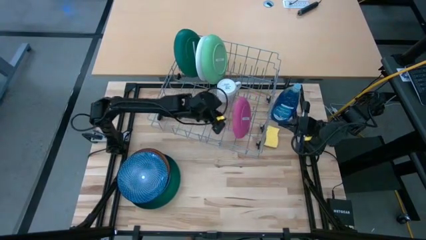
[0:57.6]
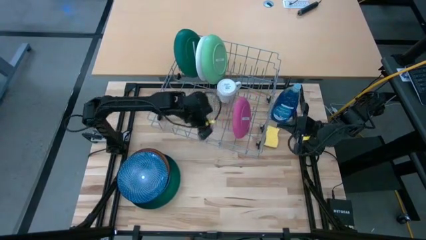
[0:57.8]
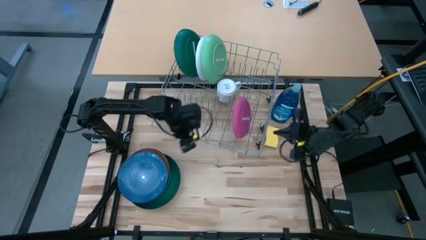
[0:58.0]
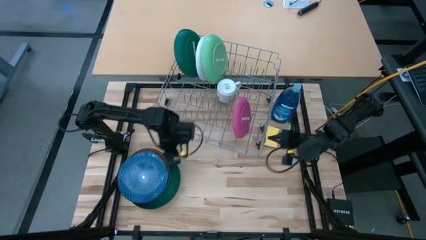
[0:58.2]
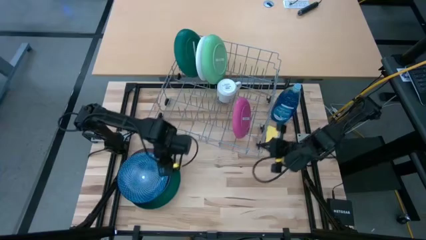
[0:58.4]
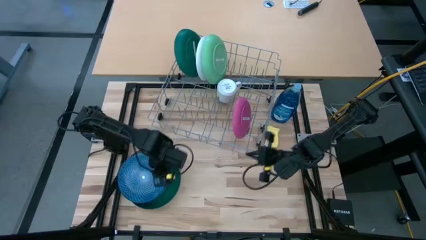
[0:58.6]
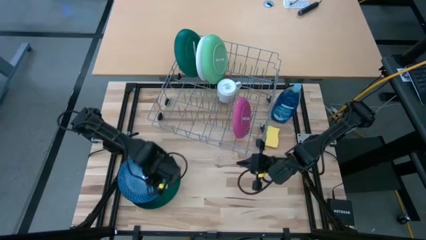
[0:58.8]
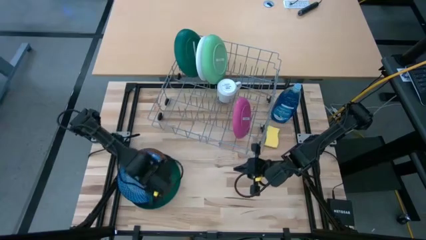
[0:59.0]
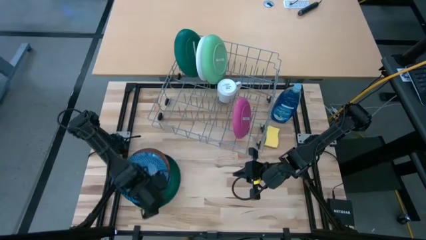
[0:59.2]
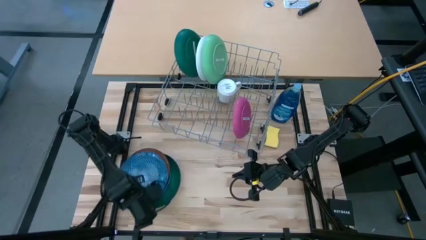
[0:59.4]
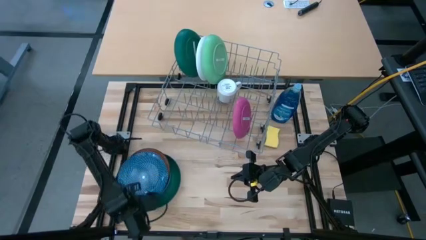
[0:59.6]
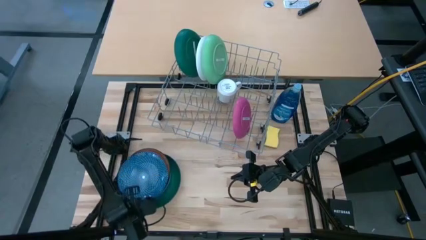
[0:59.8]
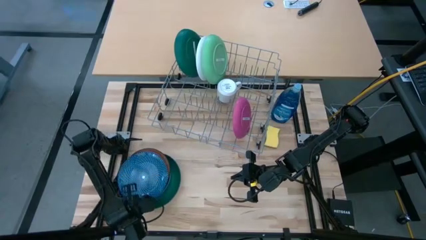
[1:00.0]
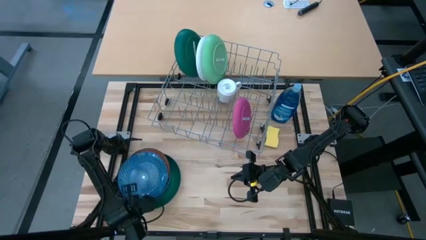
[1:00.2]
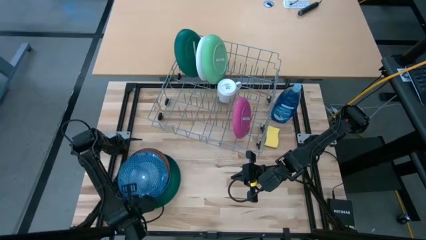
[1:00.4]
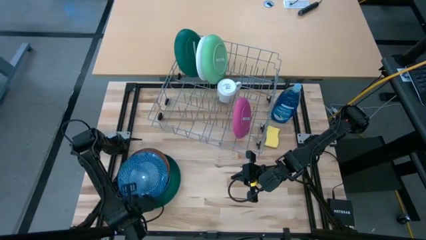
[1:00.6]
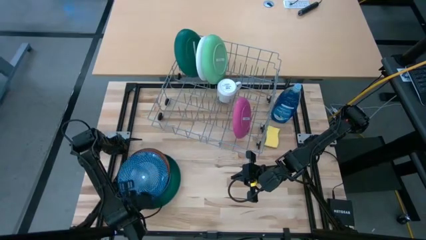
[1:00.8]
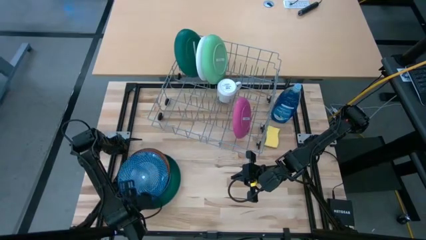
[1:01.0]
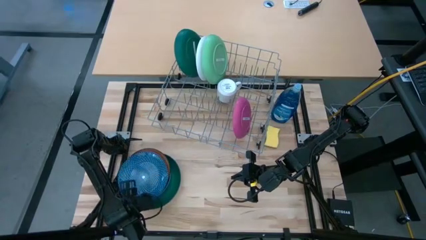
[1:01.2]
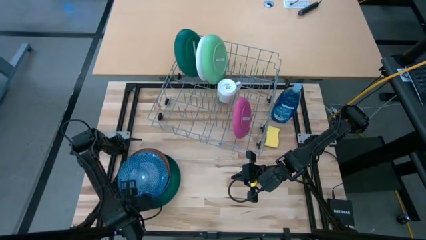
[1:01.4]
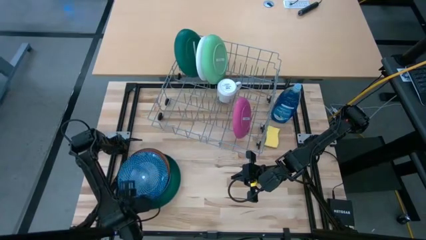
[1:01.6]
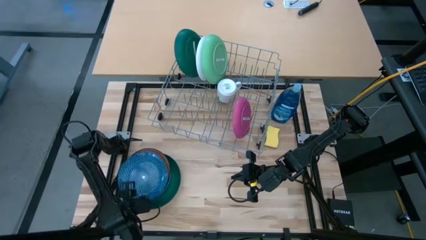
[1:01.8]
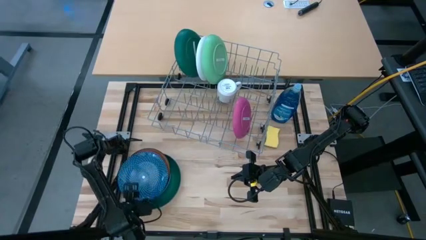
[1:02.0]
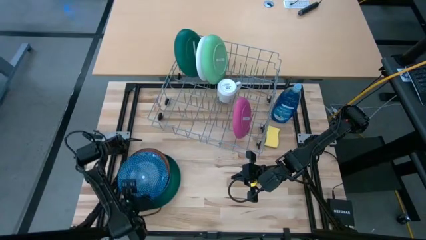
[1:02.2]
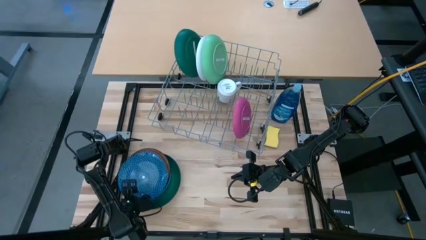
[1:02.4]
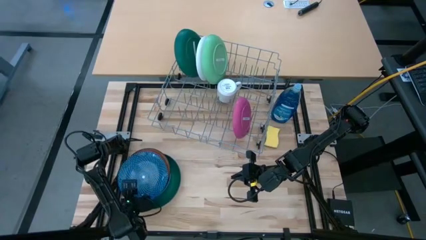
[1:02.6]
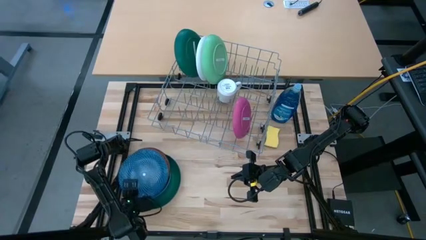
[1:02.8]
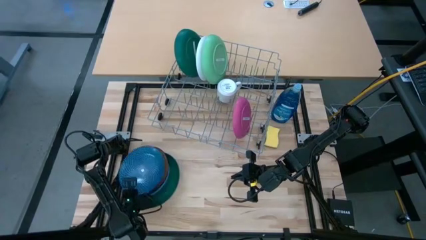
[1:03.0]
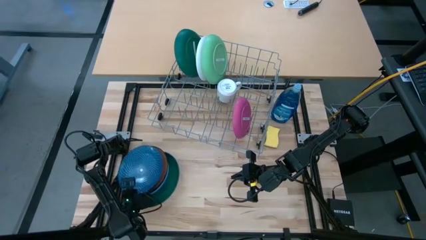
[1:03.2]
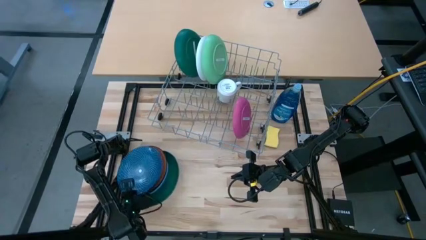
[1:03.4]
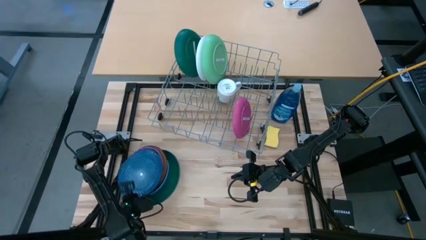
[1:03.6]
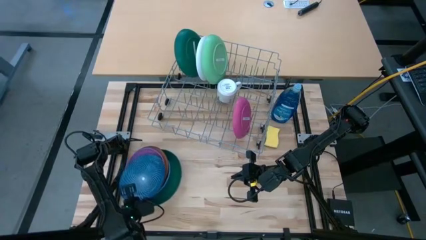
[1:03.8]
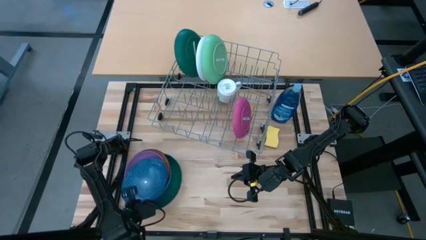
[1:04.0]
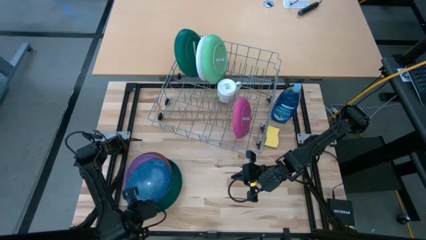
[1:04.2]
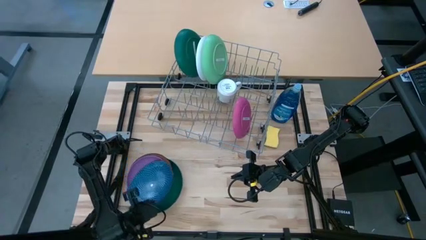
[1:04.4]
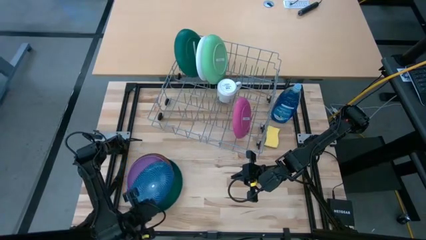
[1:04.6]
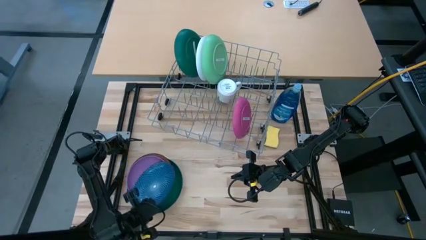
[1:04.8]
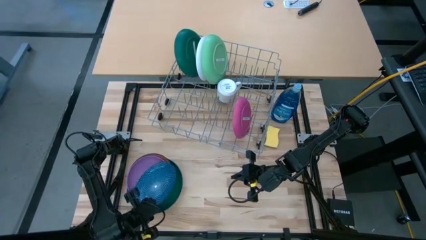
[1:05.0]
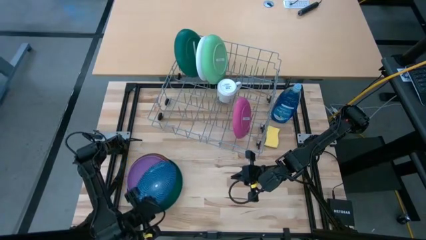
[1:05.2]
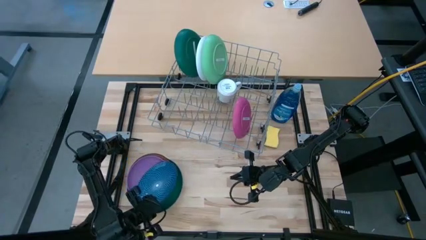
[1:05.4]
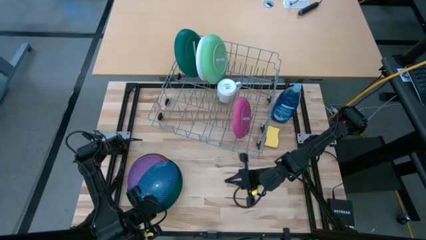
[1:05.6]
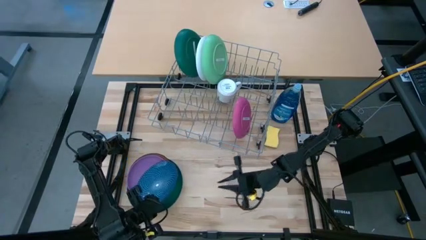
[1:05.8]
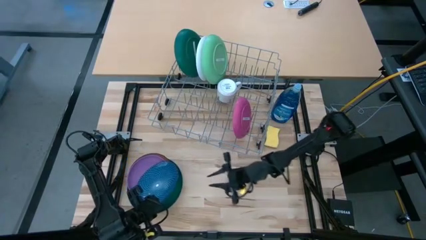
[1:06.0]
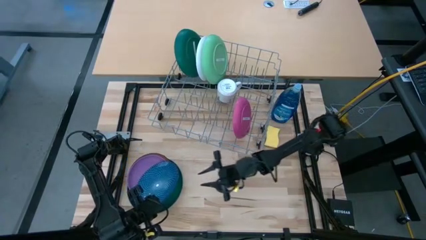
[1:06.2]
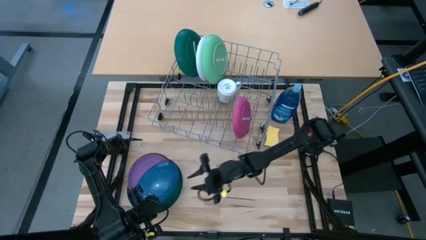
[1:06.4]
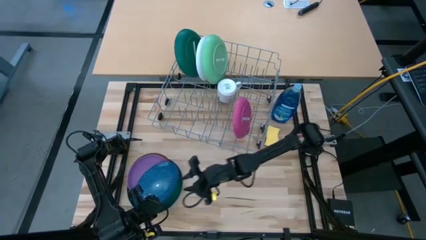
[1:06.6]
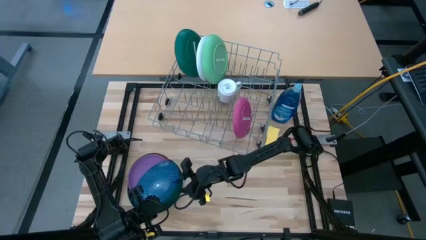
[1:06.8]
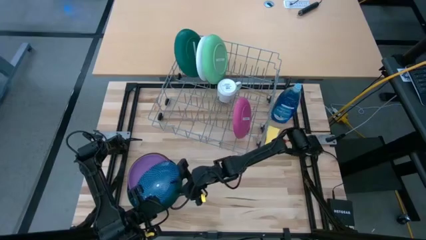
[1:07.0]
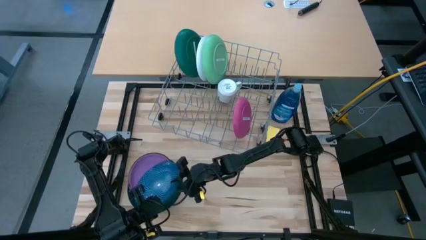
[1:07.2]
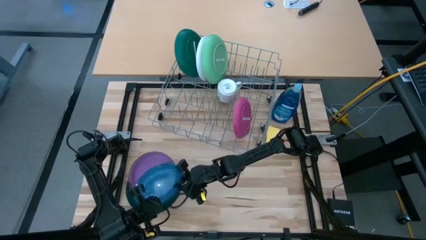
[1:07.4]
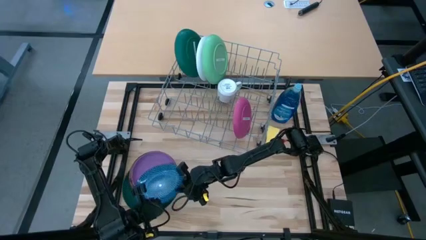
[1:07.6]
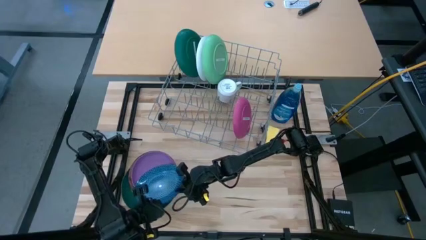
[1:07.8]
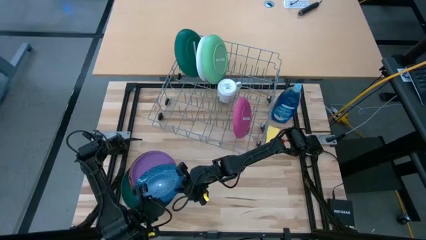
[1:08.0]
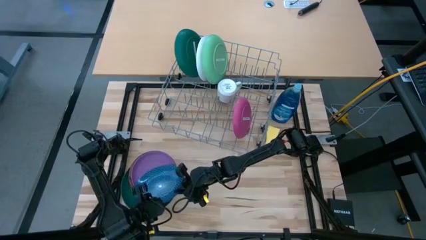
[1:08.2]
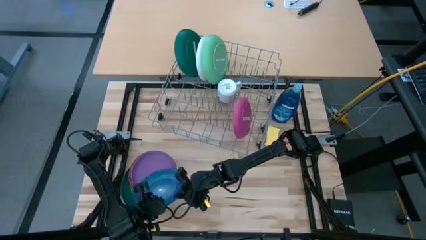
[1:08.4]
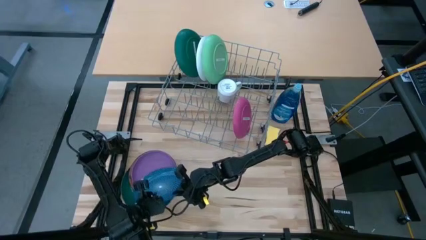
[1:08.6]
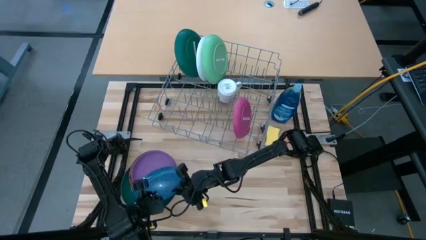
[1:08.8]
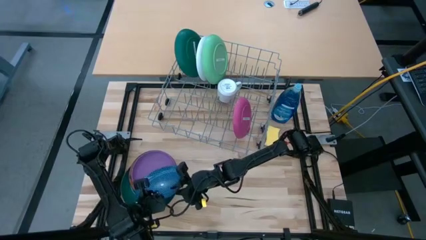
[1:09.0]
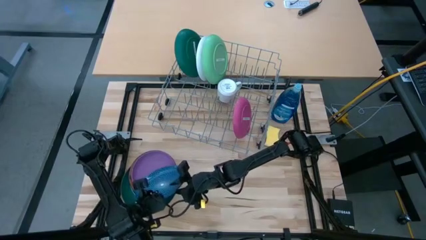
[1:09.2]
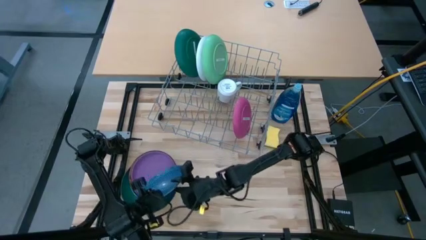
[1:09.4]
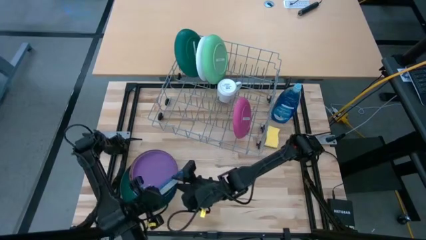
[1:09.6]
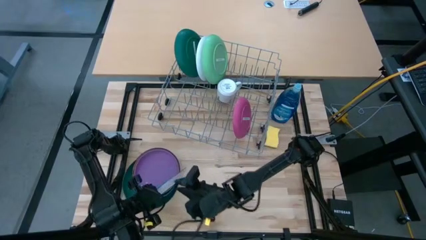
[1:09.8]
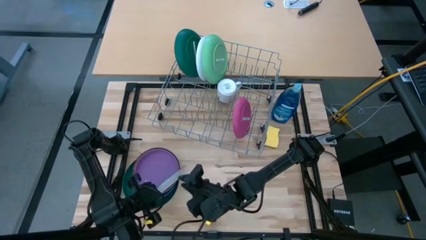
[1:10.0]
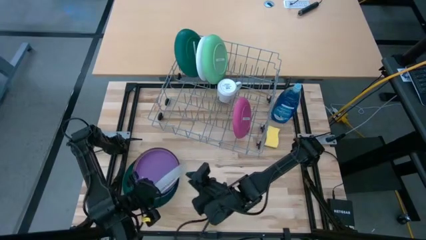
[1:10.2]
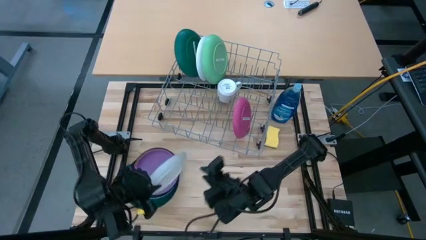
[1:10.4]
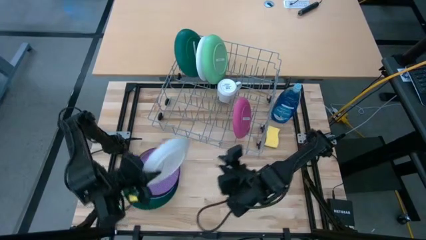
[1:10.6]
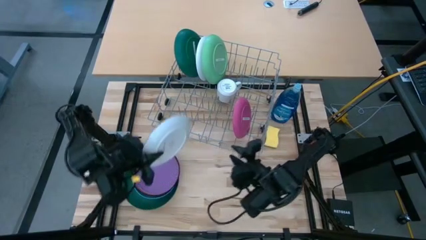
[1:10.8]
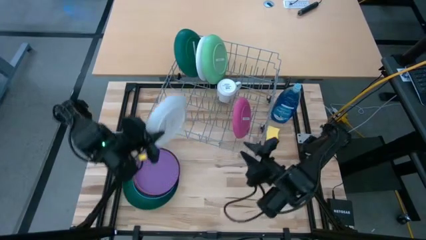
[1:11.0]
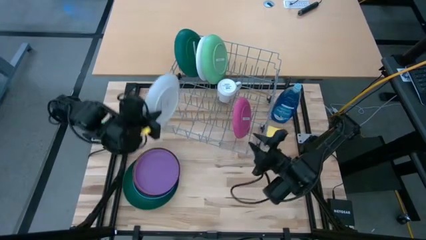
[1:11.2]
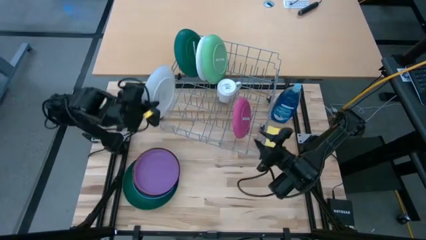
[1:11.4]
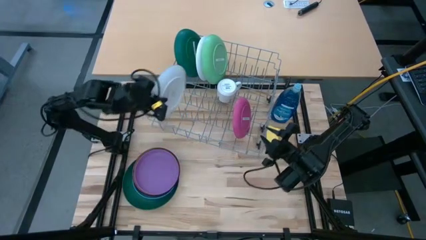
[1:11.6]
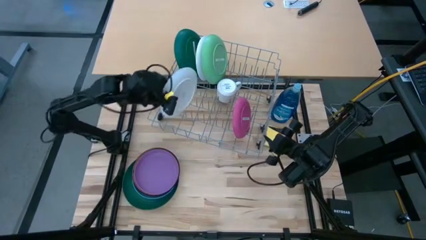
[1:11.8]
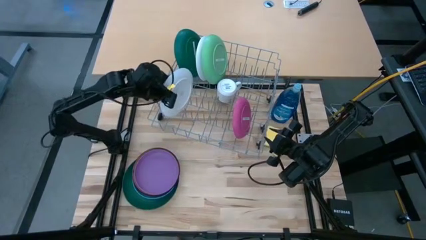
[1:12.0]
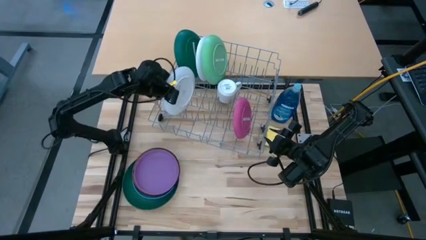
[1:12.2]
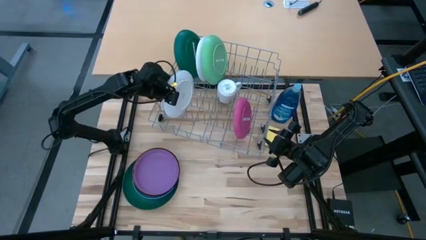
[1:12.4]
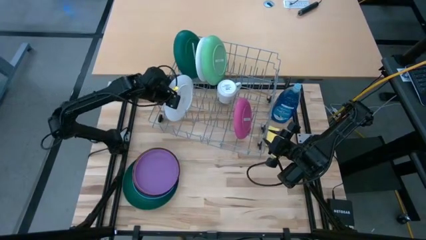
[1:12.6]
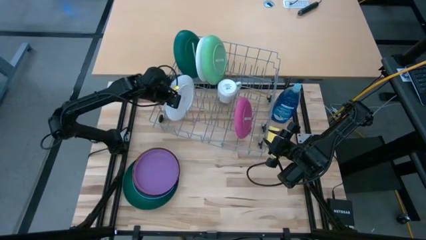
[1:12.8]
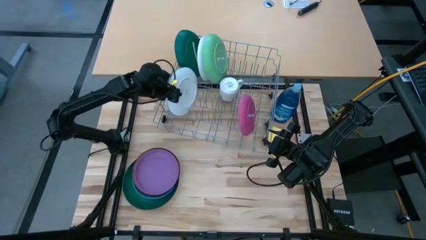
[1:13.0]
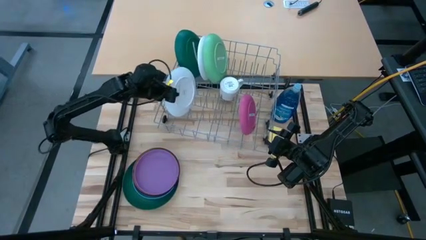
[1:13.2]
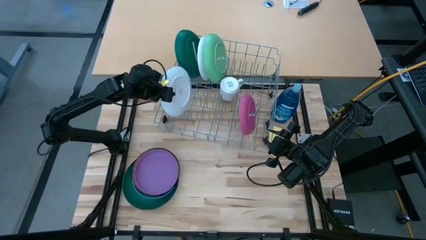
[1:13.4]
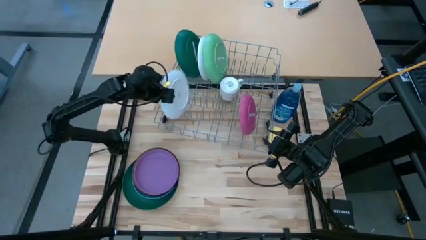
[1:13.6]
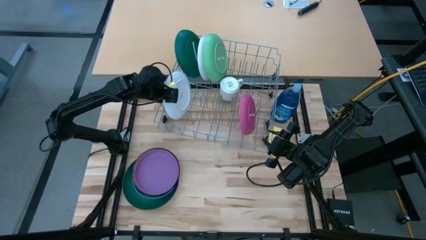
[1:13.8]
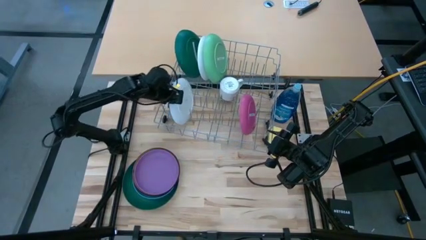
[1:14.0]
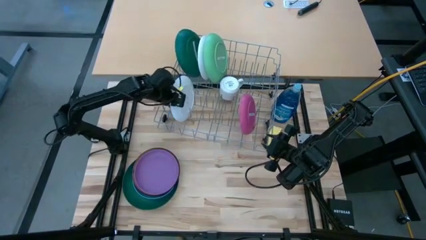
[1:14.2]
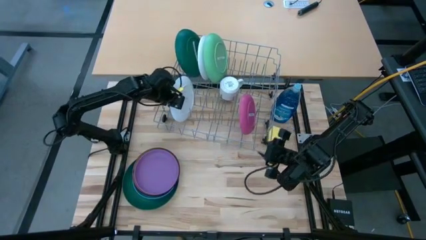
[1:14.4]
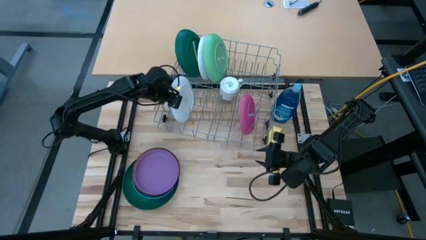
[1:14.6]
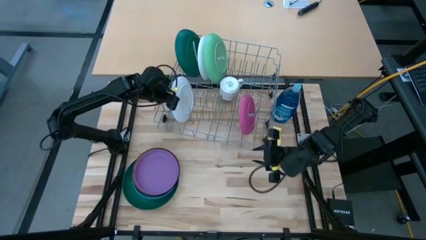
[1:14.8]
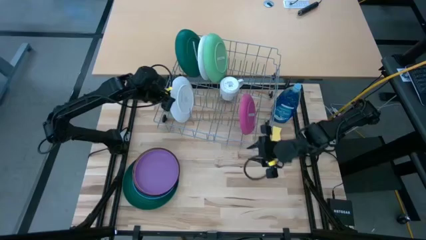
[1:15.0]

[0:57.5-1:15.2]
Task: Sort dishes
Put the blue patterned plate in the dish rack
